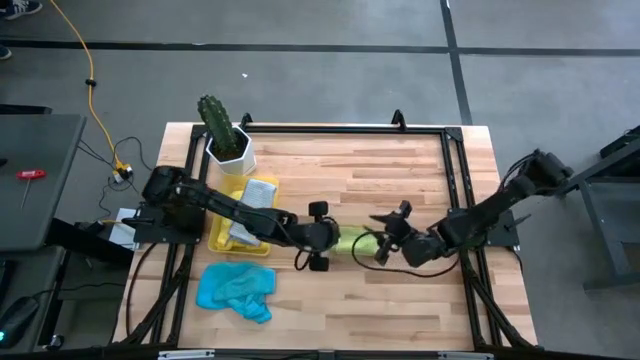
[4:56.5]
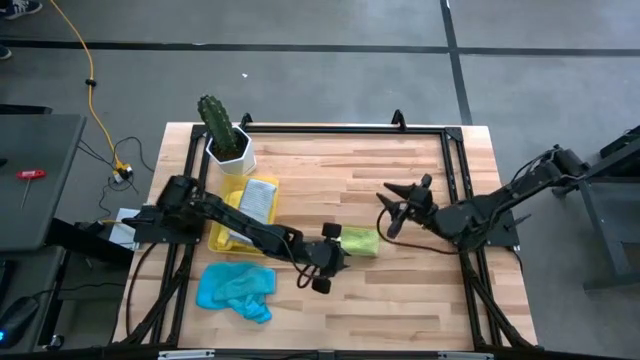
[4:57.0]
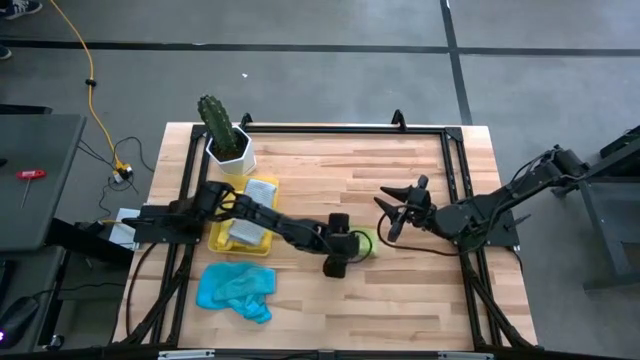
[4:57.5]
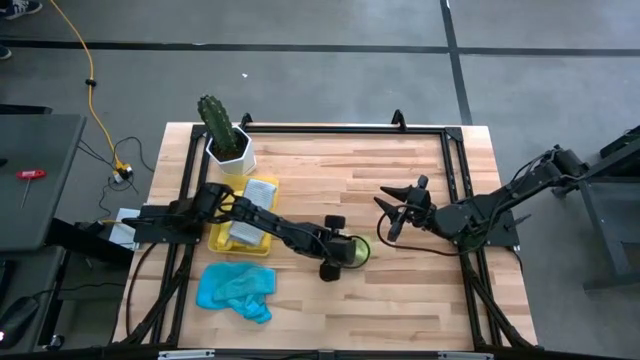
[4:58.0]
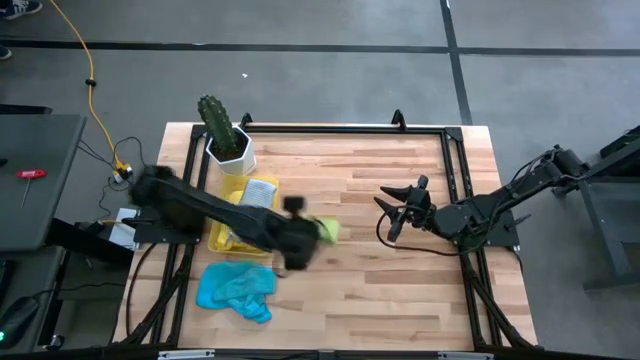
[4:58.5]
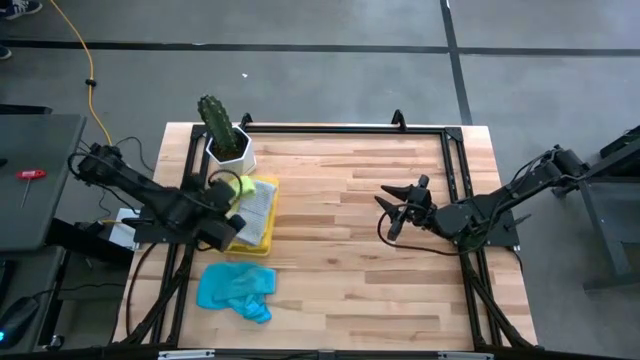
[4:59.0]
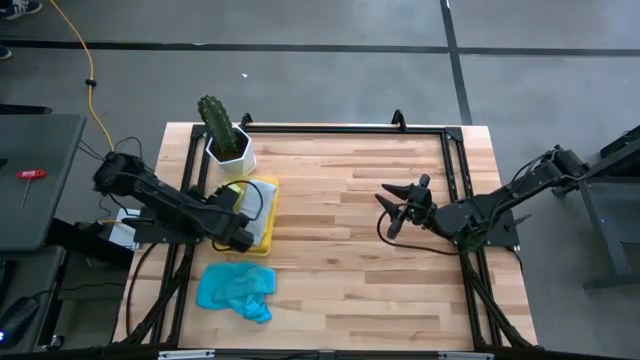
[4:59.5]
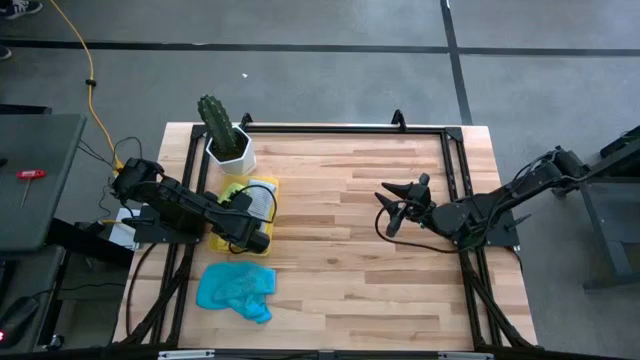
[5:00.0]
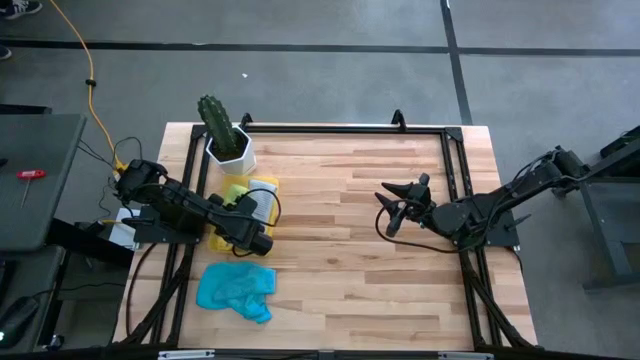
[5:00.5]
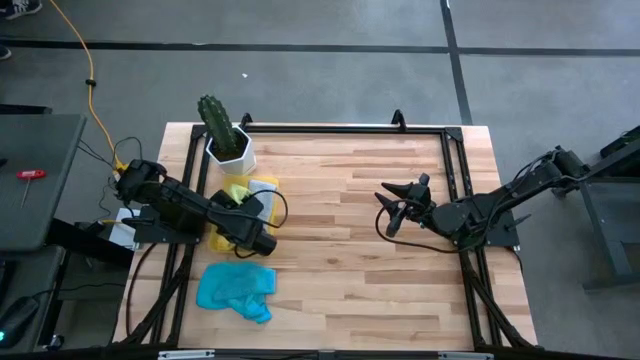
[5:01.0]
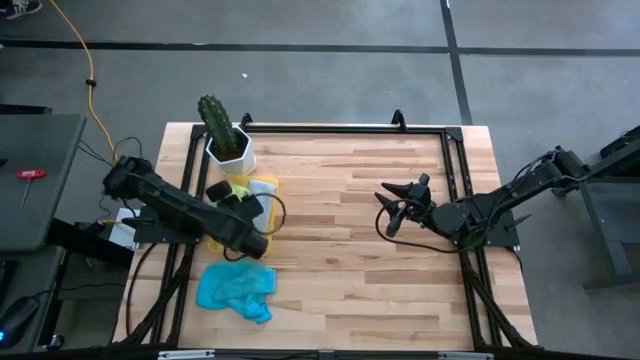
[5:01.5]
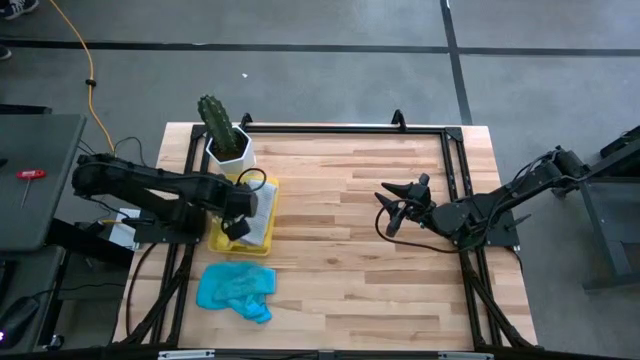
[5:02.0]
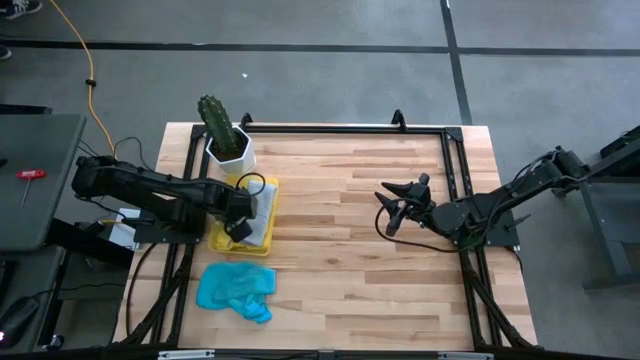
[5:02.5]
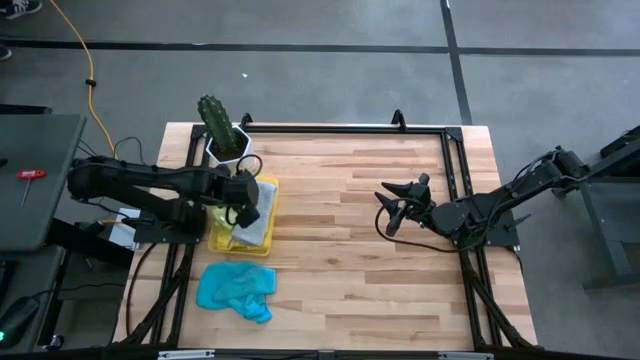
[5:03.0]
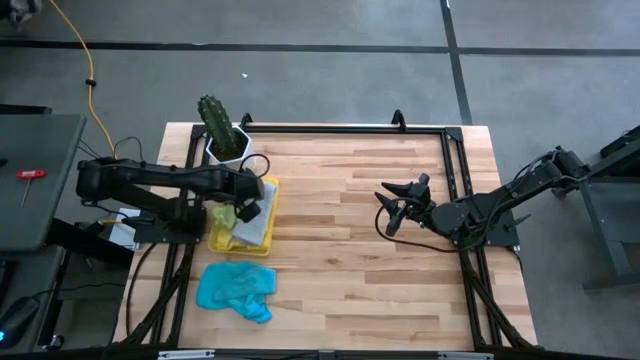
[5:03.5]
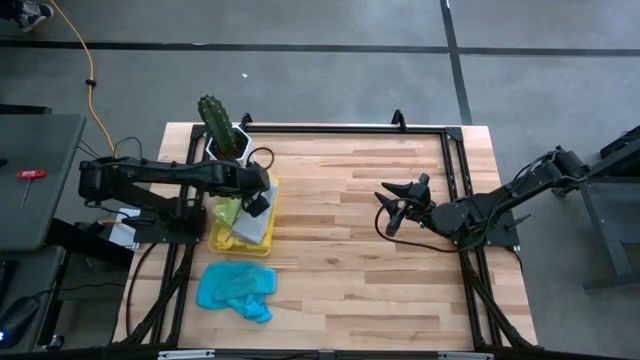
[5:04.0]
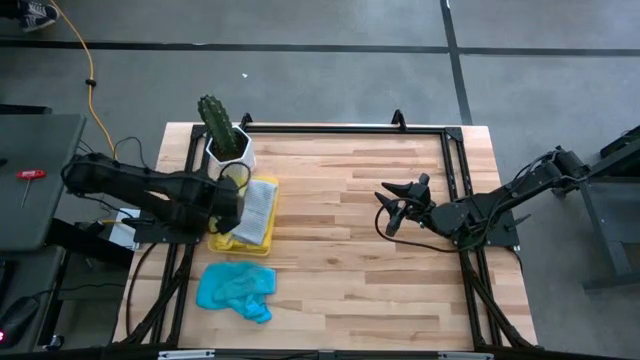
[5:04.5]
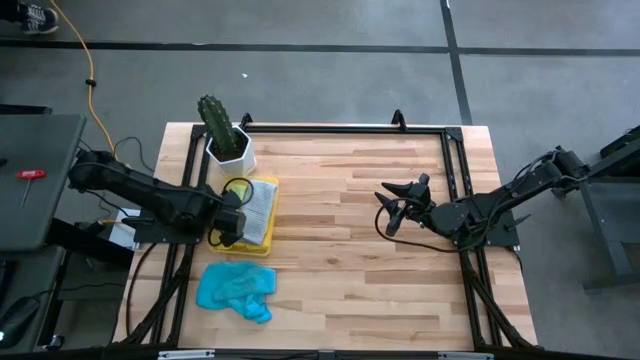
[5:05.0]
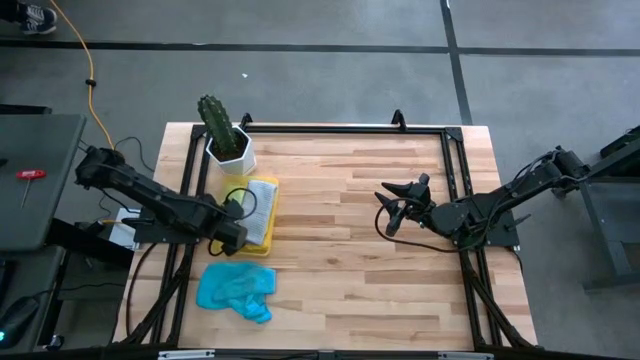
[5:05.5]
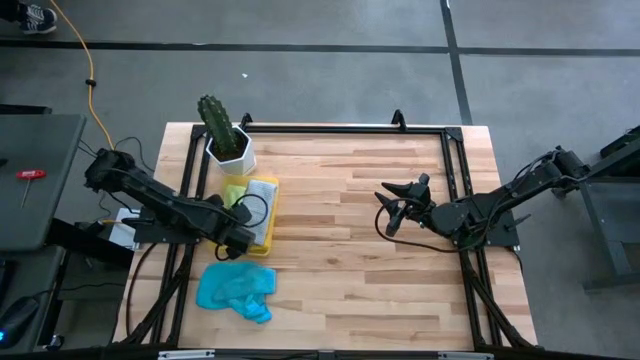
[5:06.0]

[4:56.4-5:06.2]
Task: Fold microfiber towels
Put the folded green microfiber towel into the yellow bin

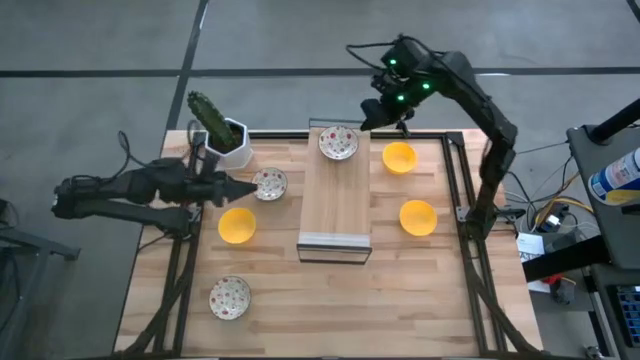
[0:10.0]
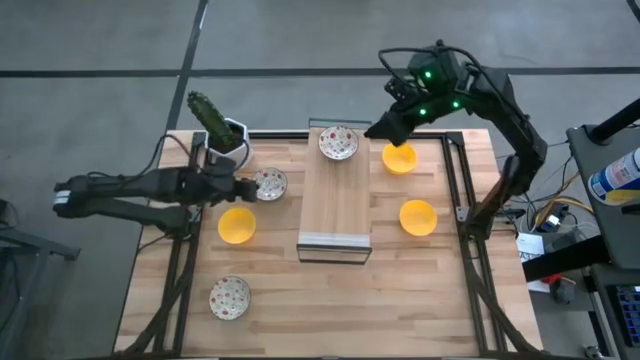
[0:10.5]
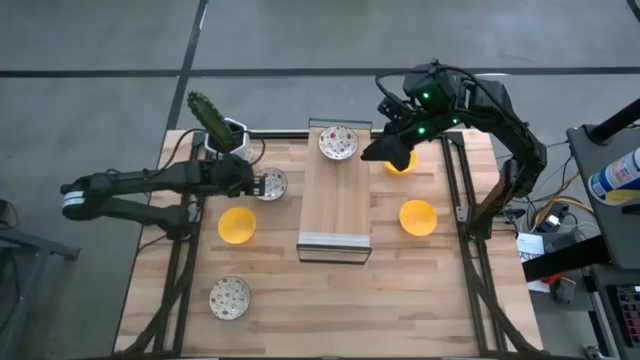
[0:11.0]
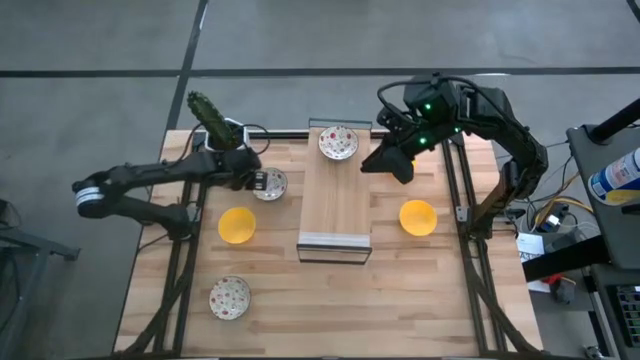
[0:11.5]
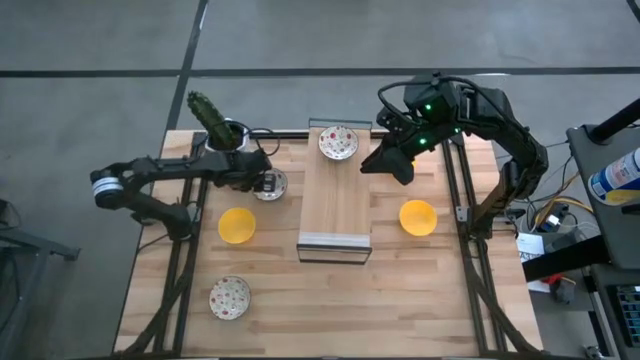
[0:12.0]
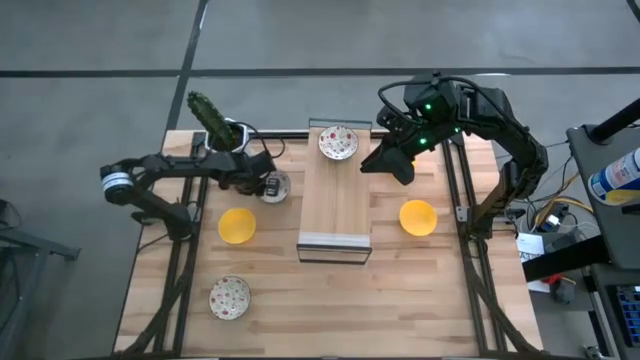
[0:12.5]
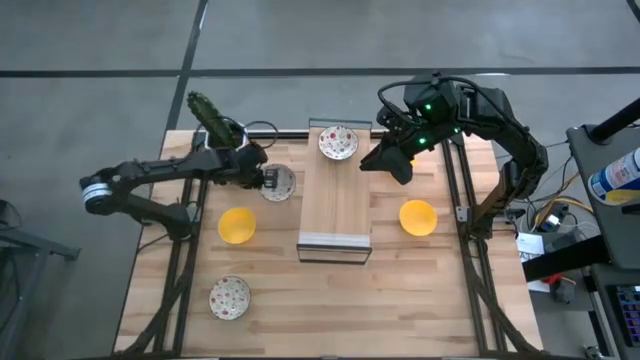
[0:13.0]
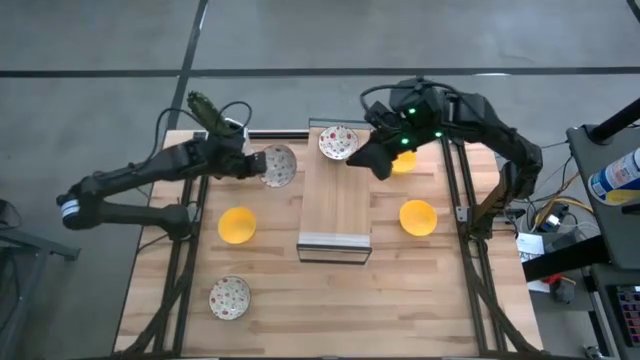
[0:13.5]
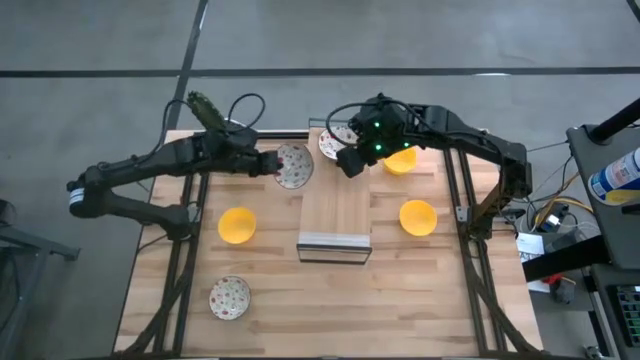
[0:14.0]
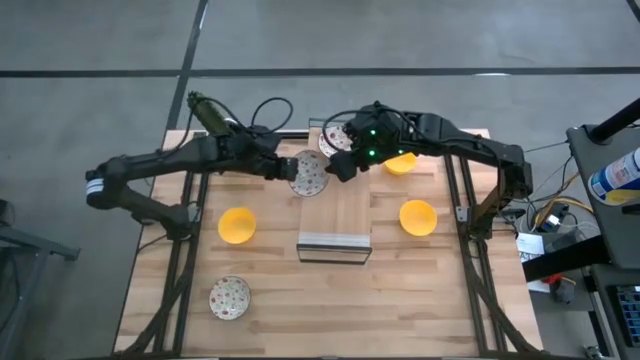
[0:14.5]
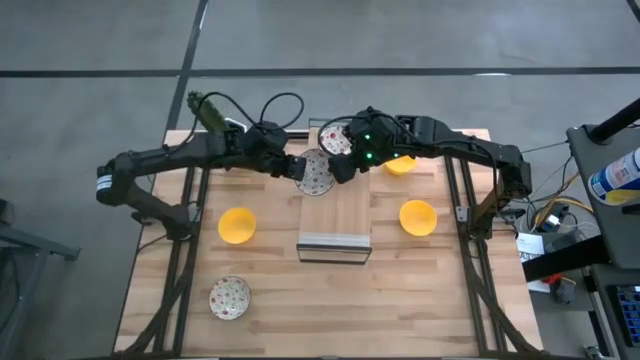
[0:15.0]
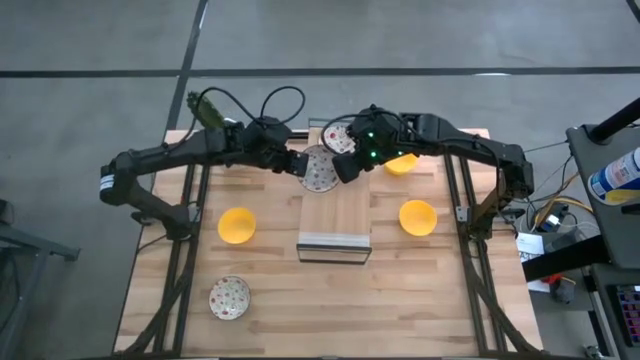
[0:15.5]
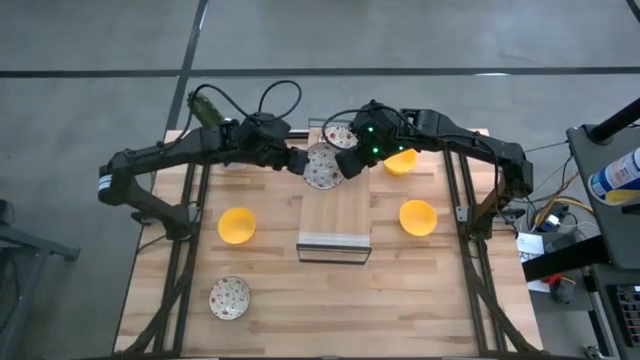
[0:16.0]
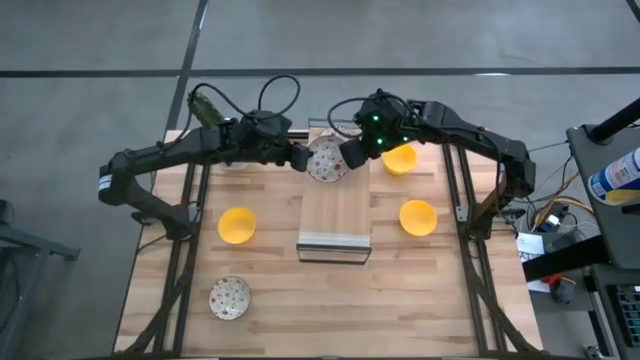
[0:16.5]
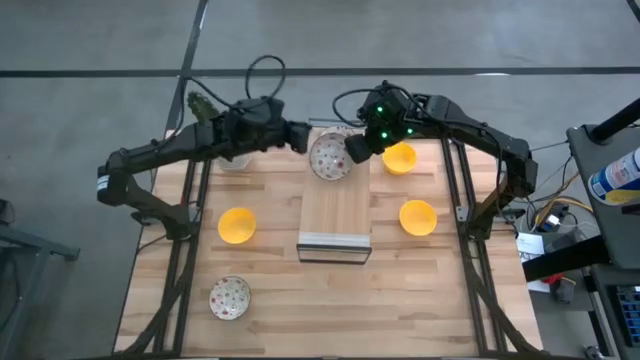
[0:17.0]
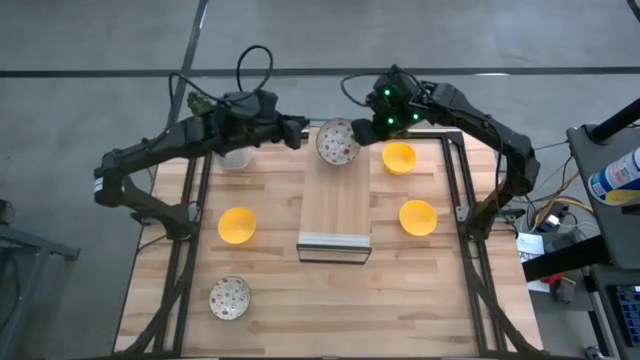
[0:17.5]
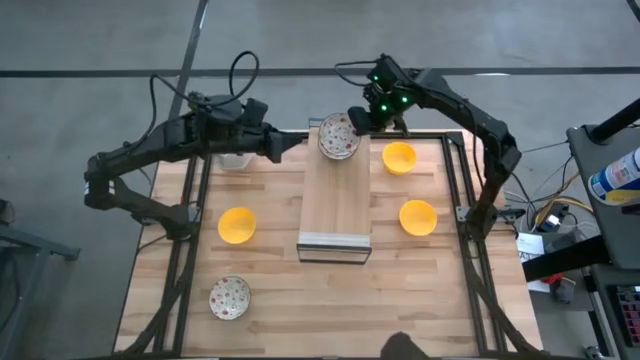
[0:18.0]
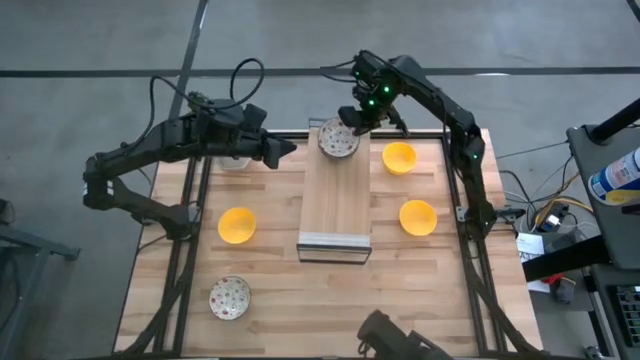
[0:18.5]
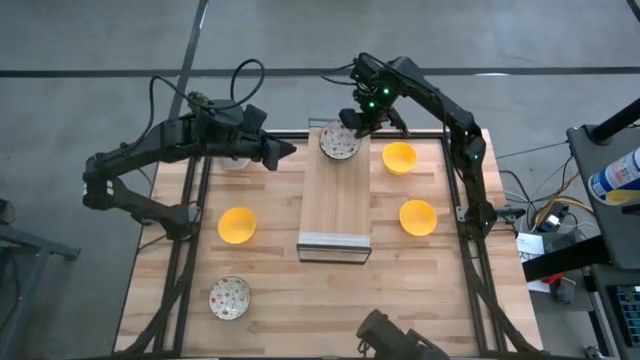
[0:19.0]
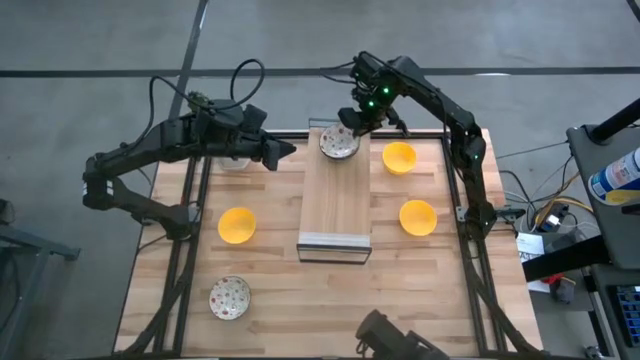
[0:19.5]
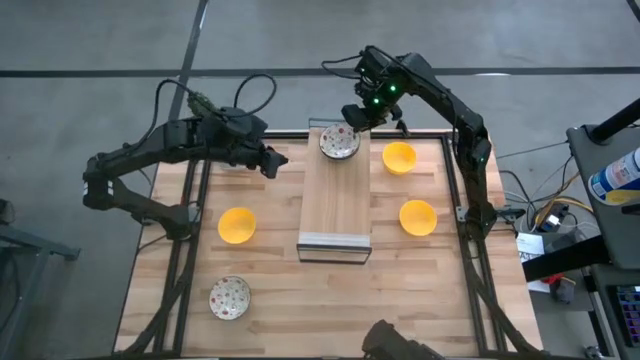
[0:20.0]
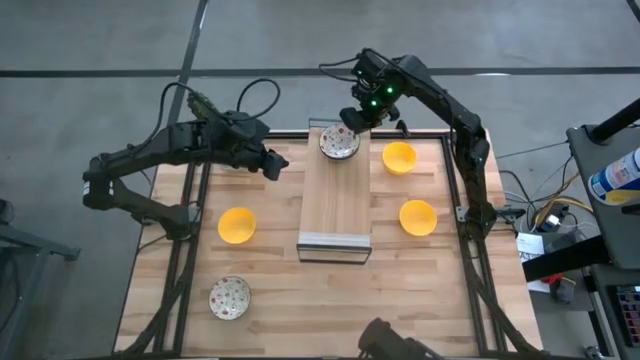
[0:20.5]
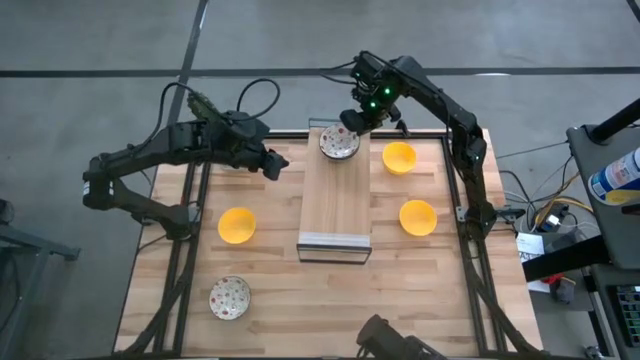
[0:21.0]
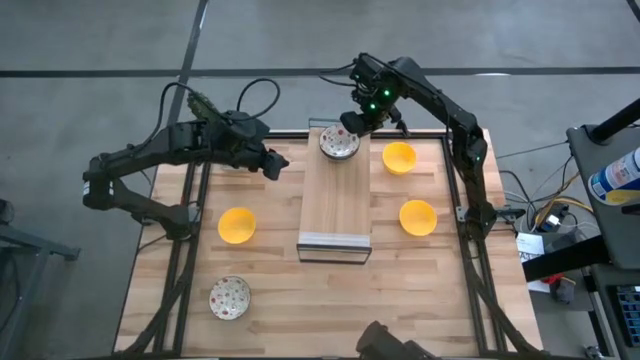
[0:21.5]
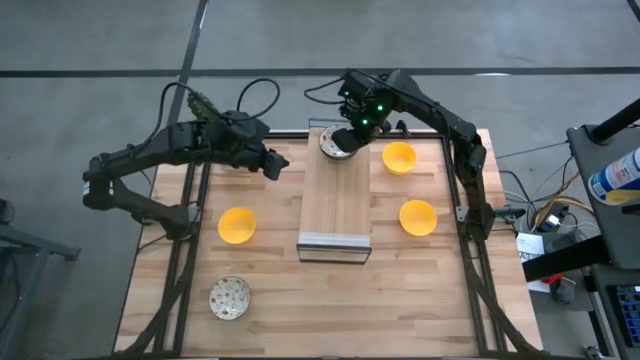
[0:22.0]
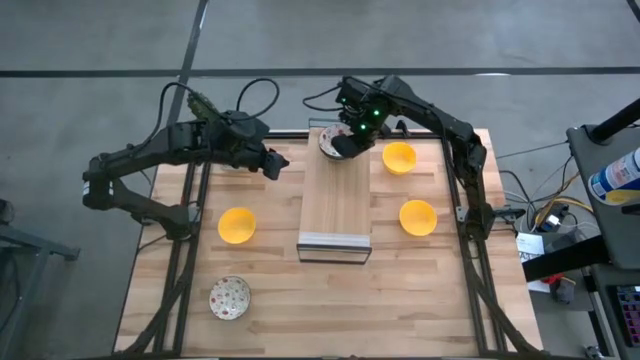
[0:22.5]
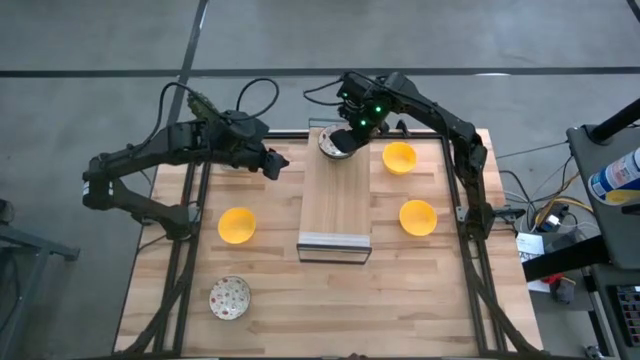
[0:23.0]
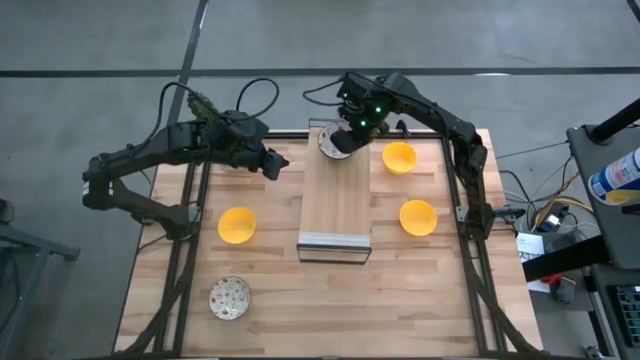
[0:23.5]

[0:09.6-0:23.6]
Task: Pick & Place Mini bowls
Stack the top white bowl on top of the other white bowl on the shelf
